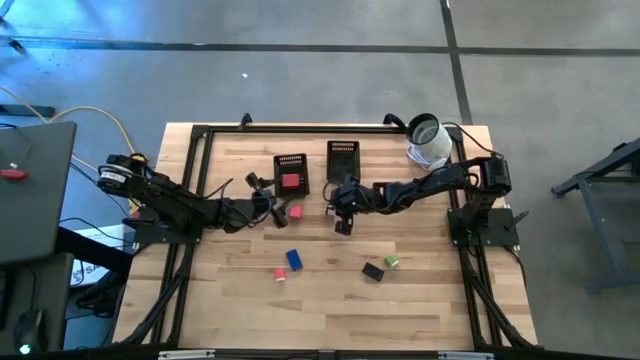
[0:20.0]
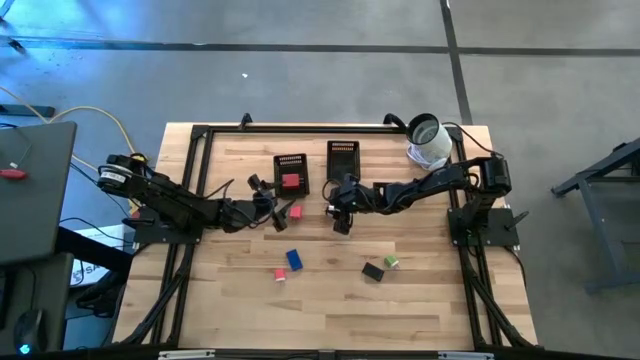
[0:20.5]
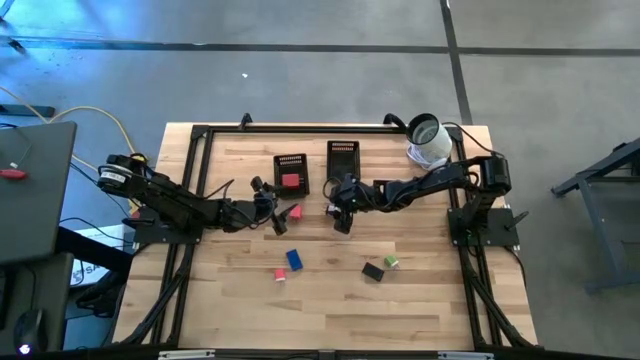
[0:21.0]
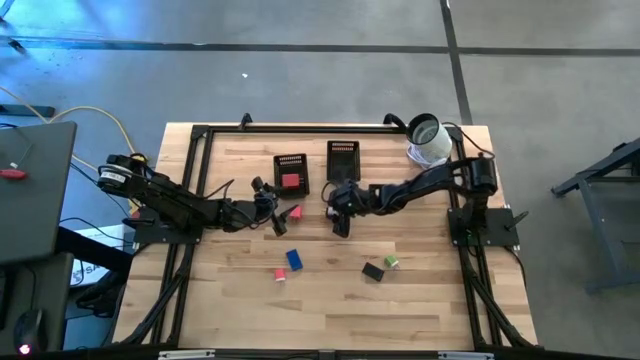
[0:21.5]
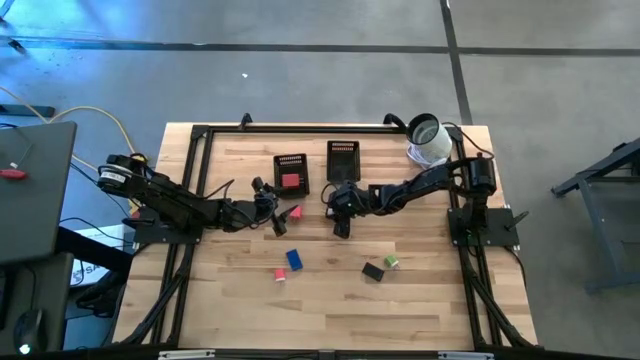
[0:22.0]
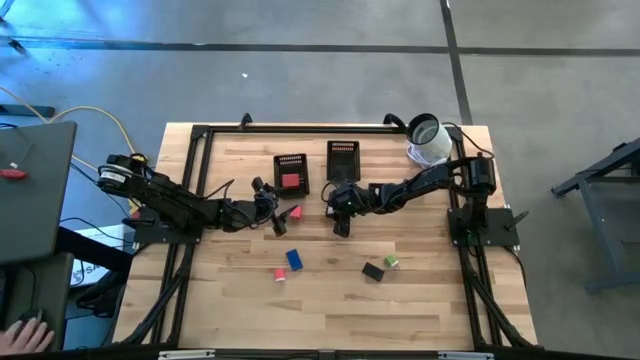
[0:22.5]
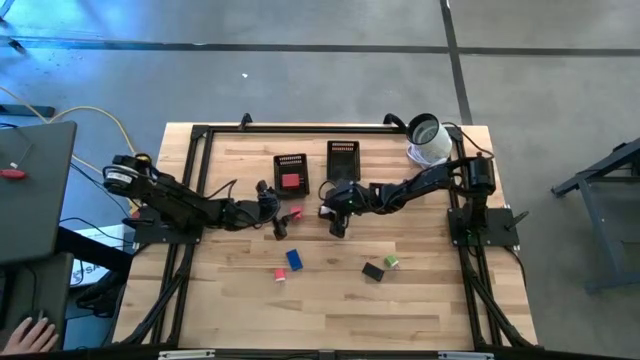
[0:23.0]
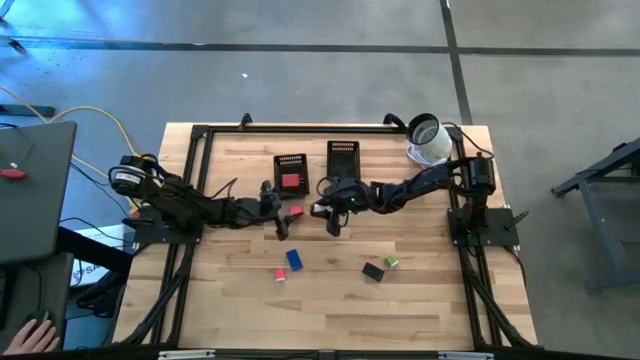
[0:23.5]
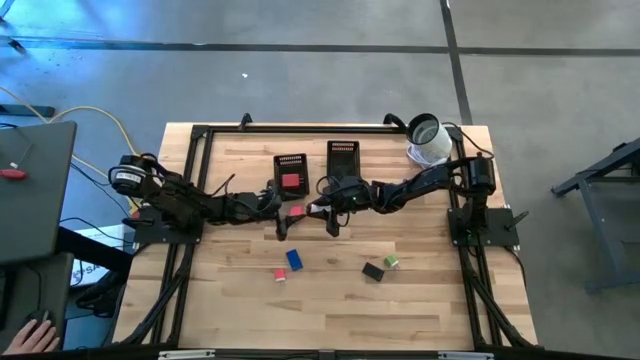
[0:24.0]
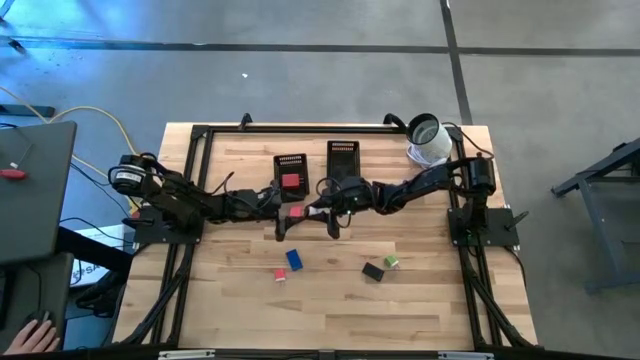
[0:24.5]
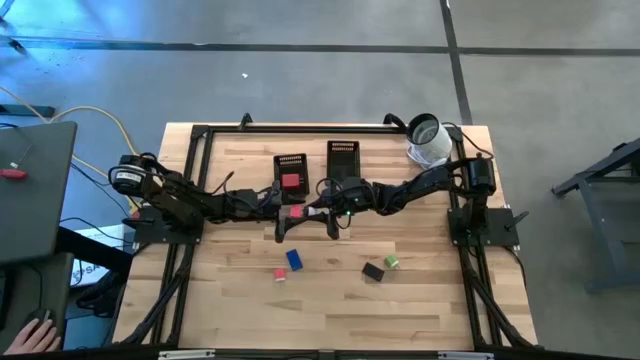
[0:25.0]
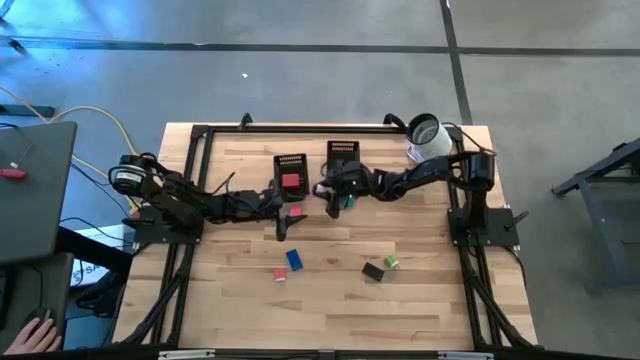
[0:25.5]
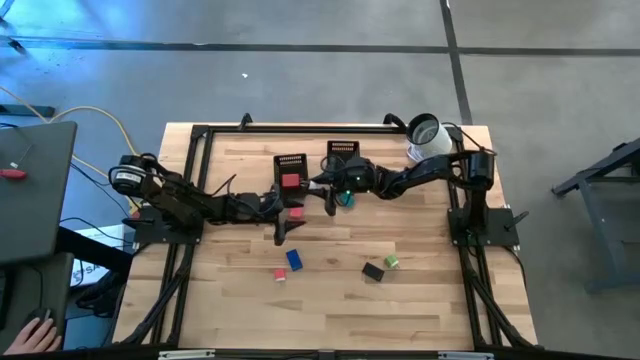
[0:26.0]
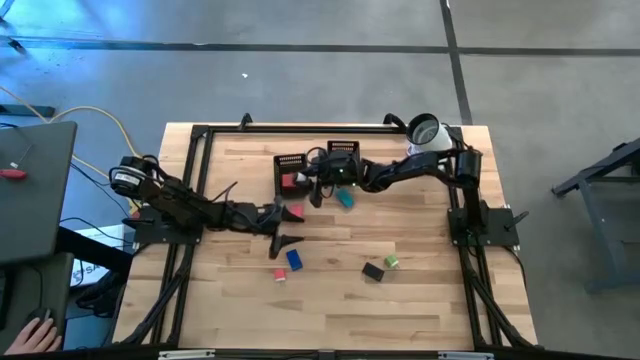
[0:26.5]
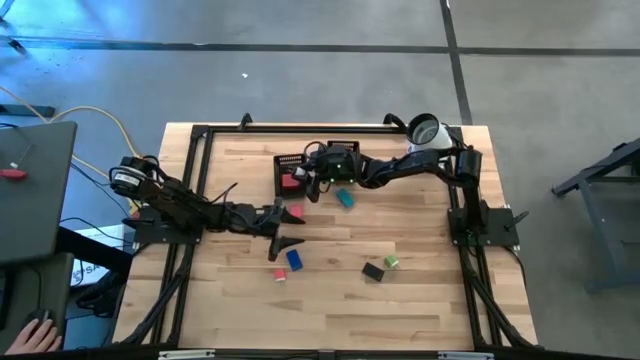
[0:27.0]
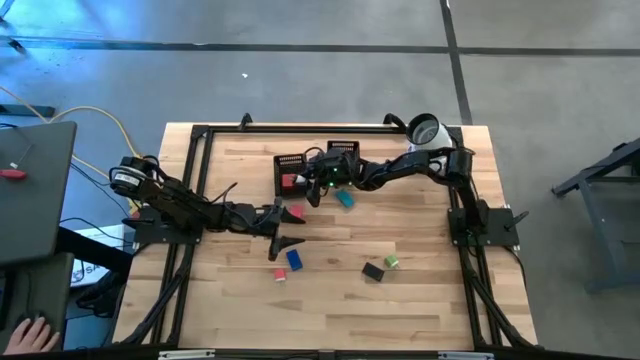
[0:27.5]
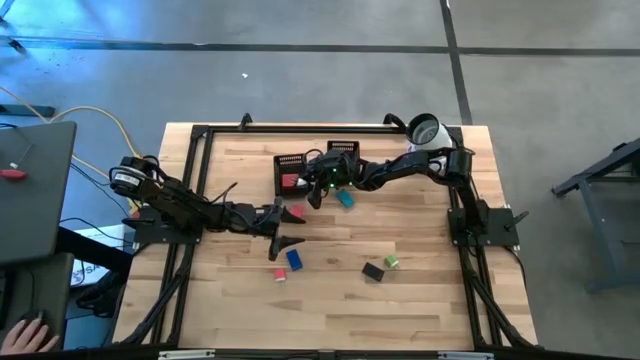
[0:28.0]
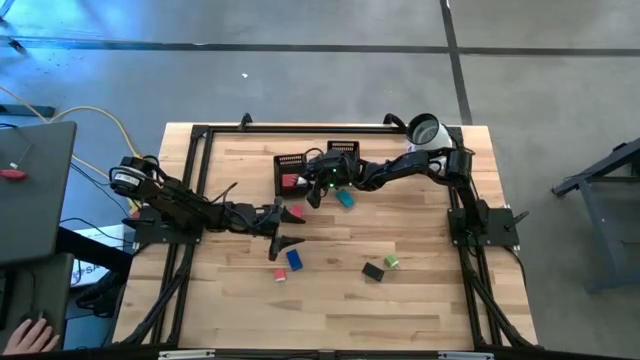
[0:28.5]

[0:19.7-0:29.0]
Task: Pick & Place Office items
Put the white charger adapter into the left black bin

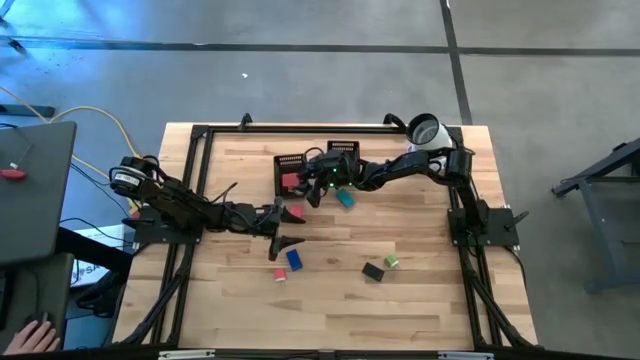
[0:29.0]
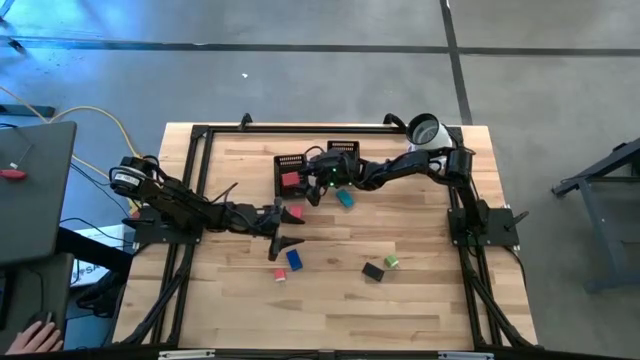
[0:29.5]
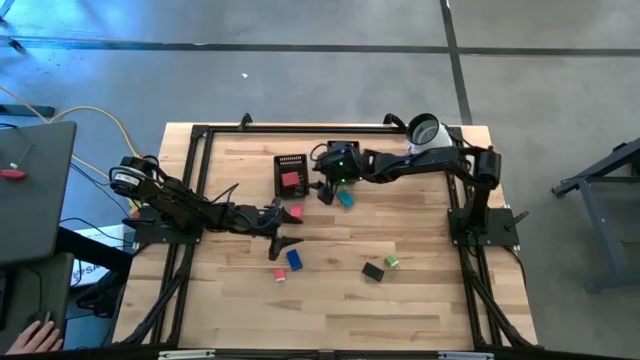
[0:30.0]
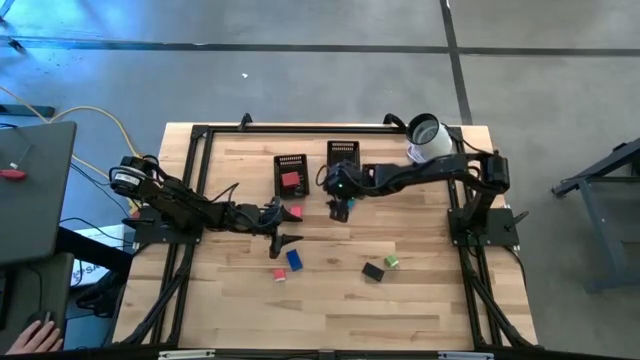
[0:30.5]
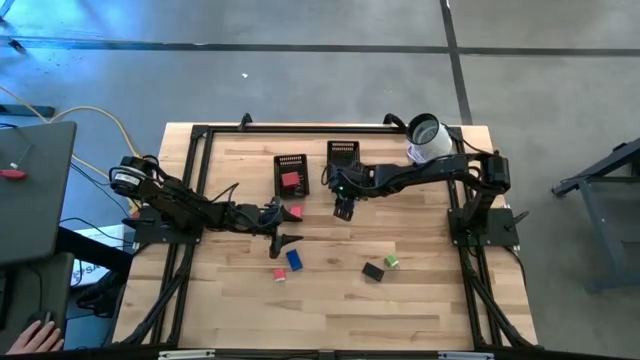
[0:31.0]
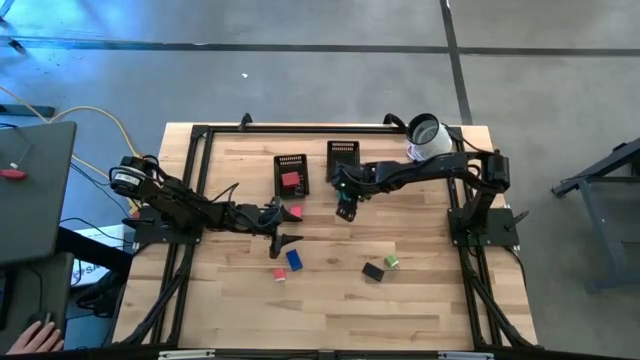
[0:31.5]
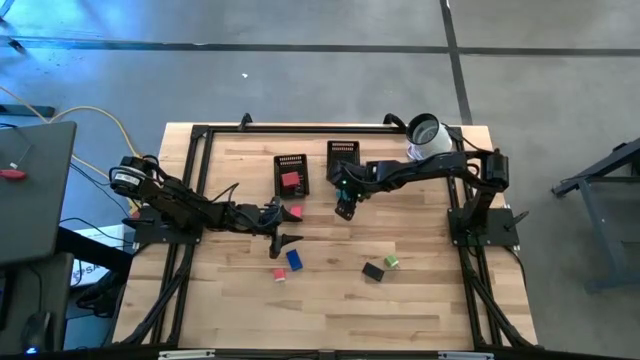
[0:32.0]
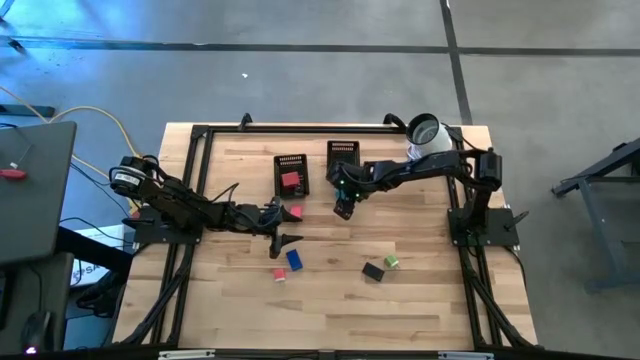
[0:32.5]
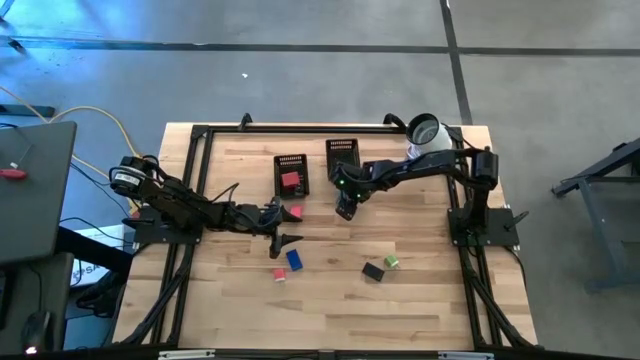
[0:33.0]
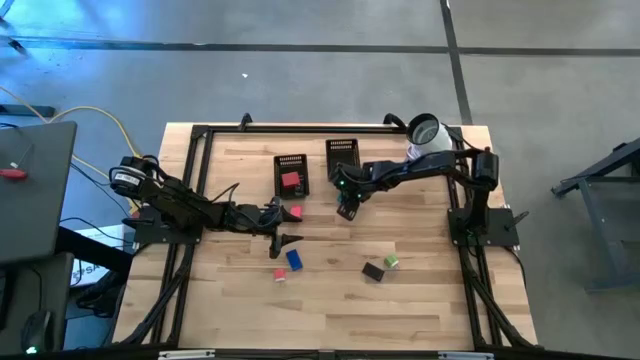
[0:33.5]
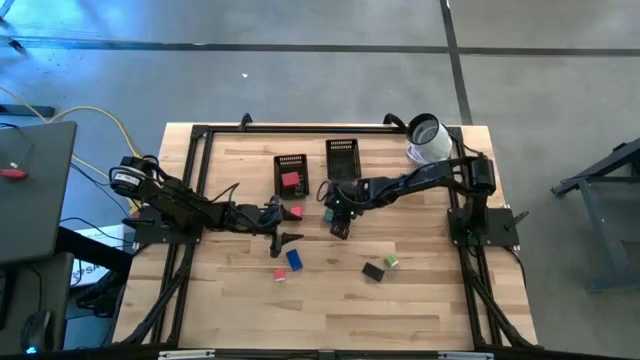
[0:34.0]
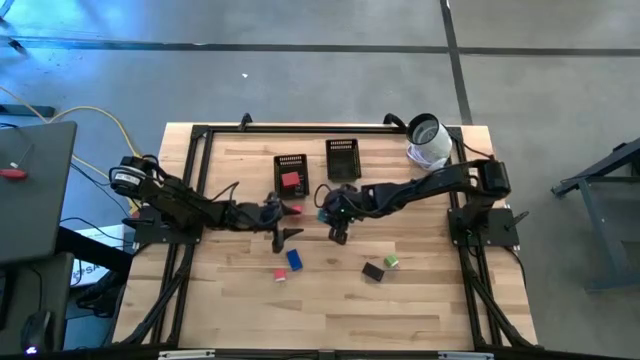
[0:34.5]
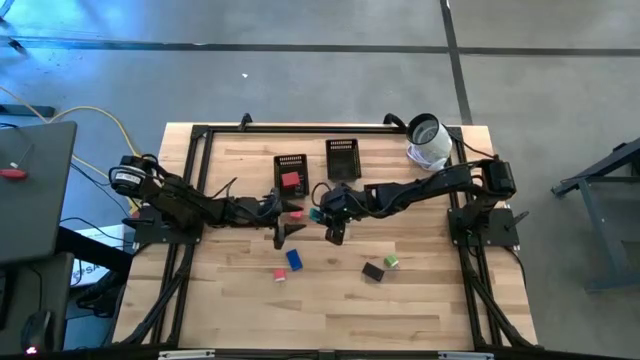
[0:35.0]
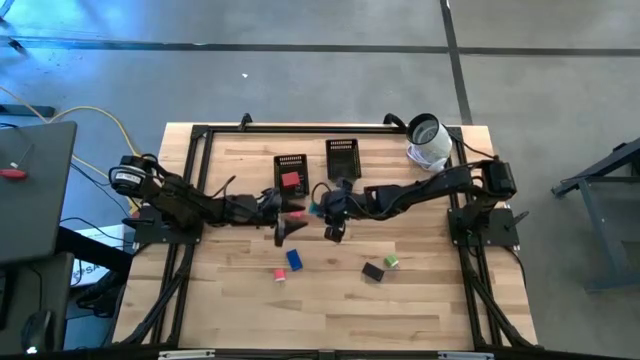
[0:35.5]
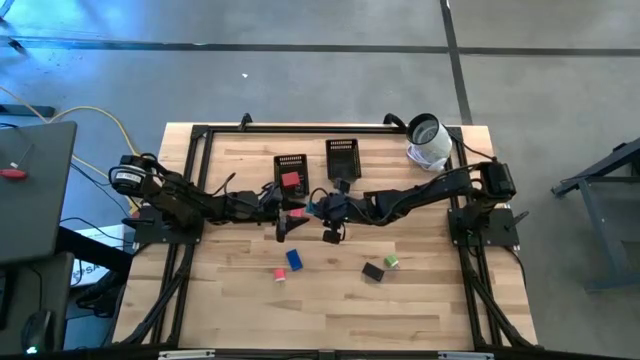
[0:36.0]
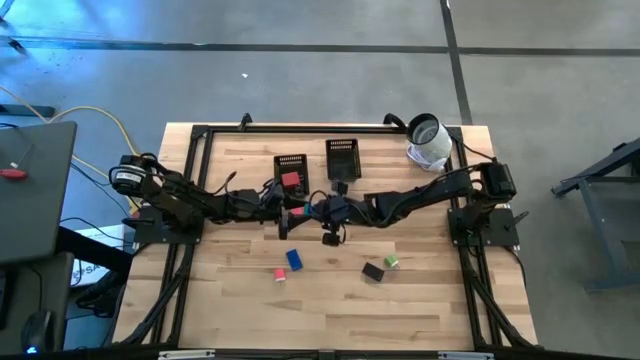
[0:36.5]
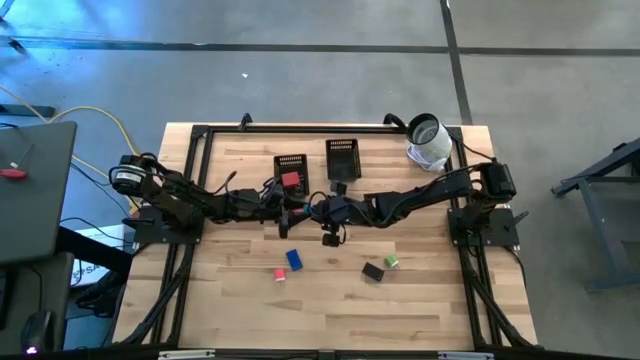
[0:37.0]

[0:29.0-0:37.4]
Put the light blue digital clock into the right black bin

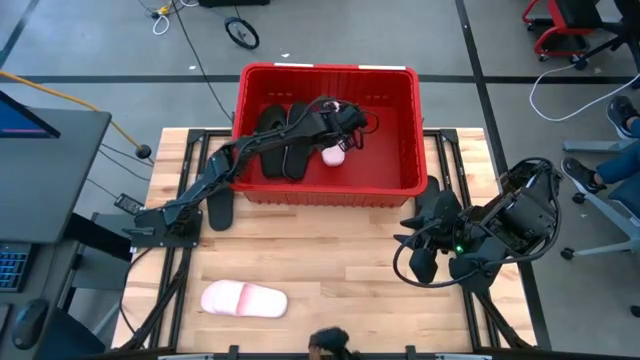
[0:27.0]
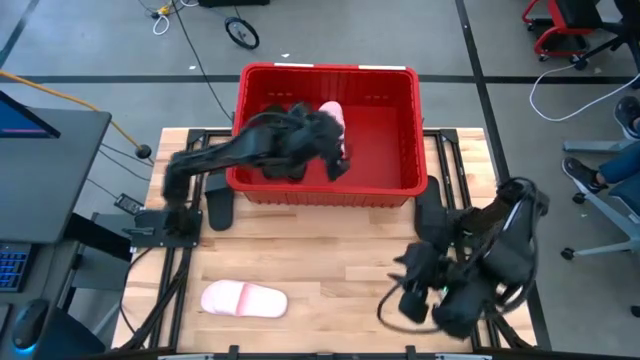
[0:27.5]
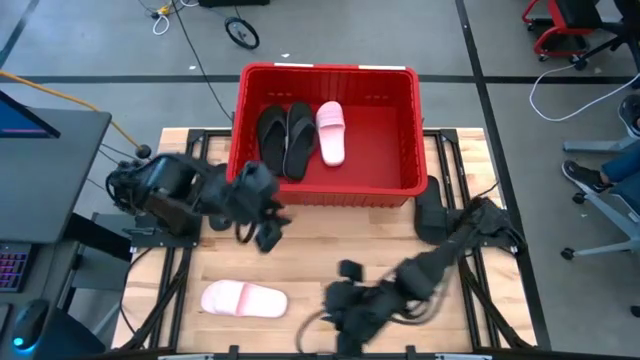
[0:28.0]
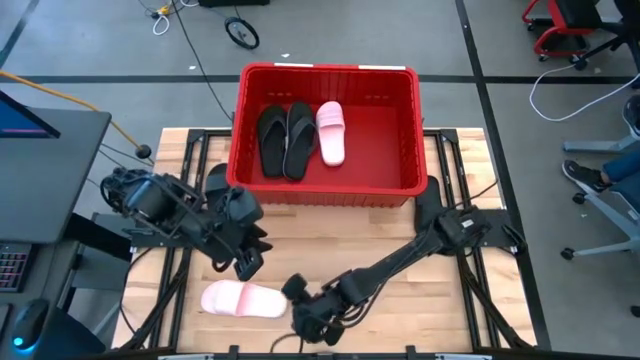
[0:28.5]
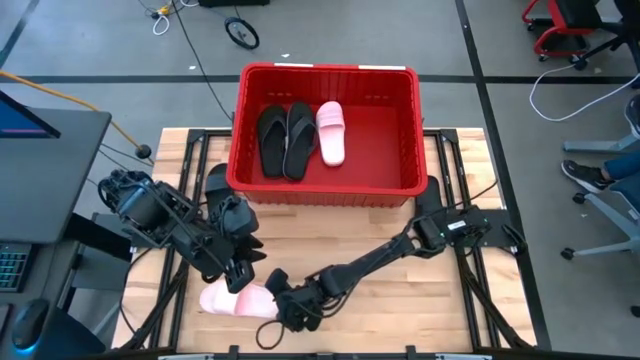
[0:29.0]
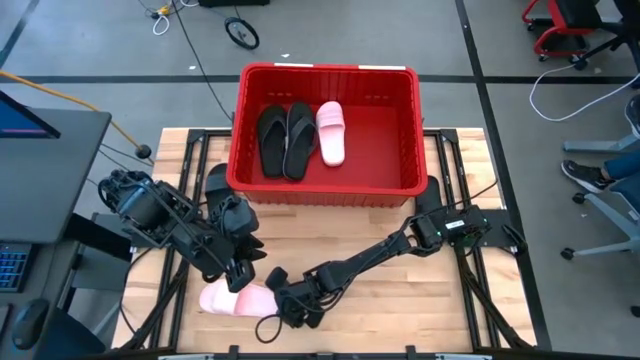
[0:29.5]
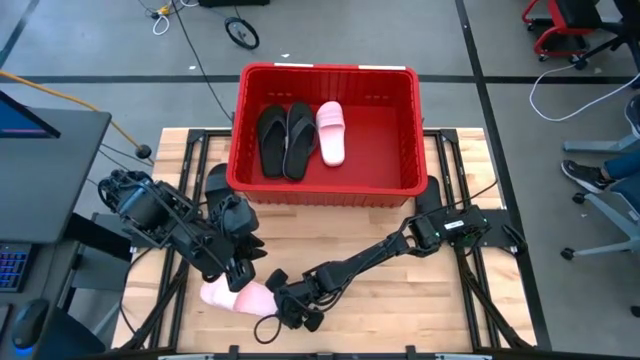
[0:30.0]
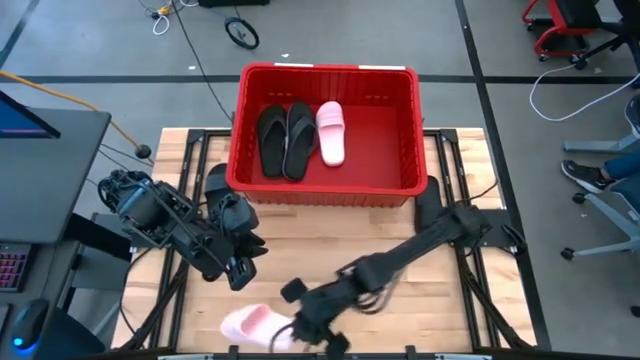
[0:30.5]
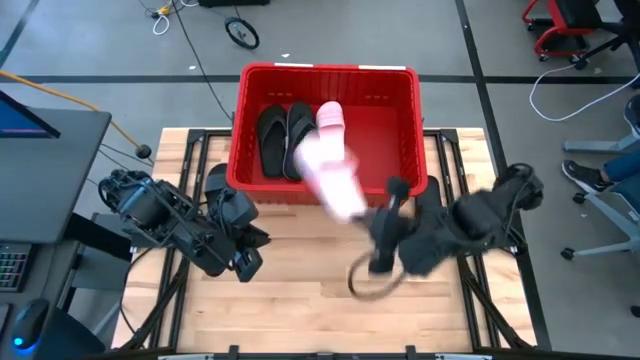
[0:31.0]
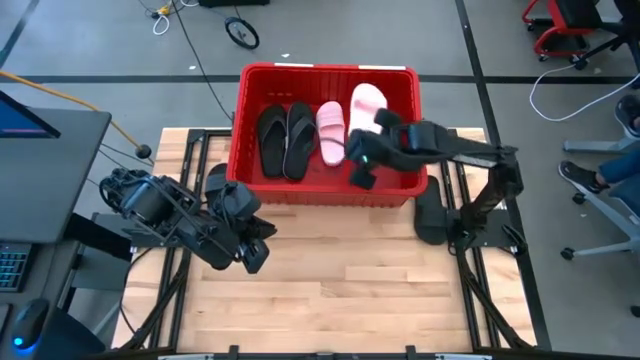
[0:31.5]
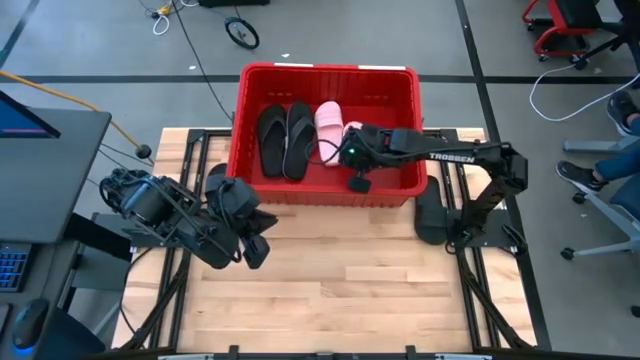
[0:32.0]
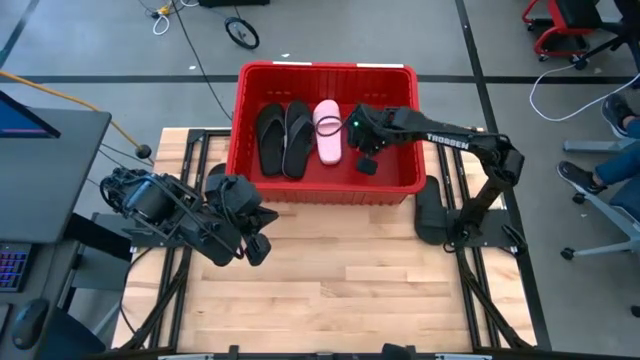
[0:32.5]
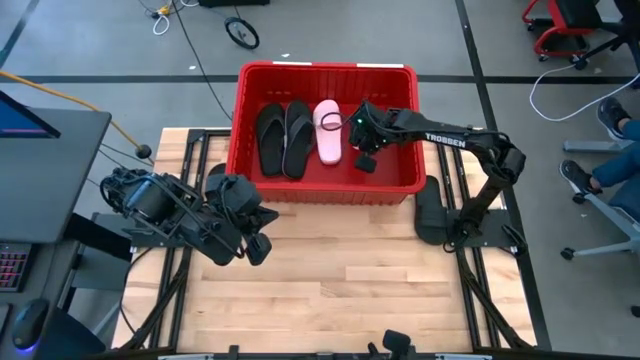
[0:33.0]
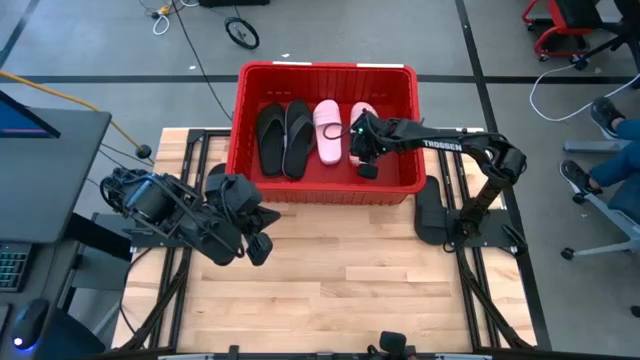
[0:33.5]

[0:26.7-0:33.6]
Task: Pick and place slides into bin
Put the pink slipper into the red bin
